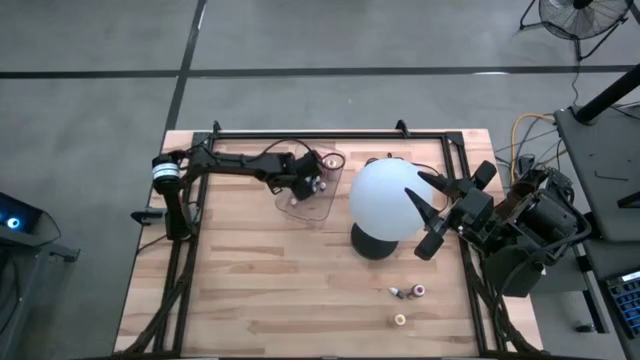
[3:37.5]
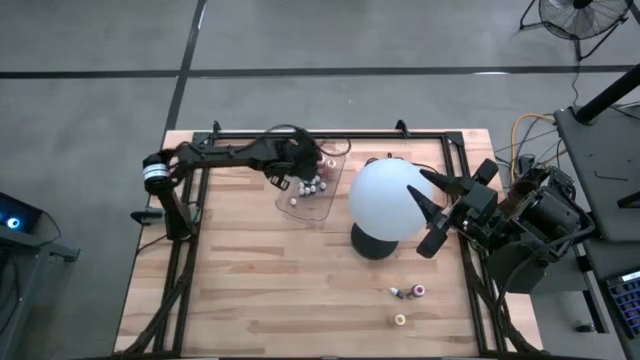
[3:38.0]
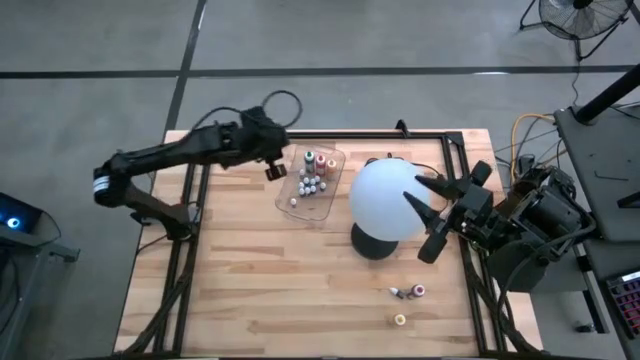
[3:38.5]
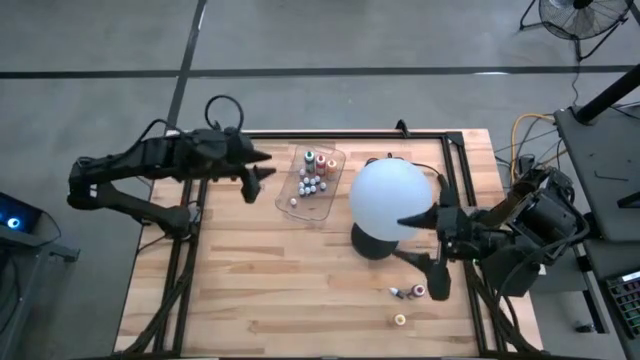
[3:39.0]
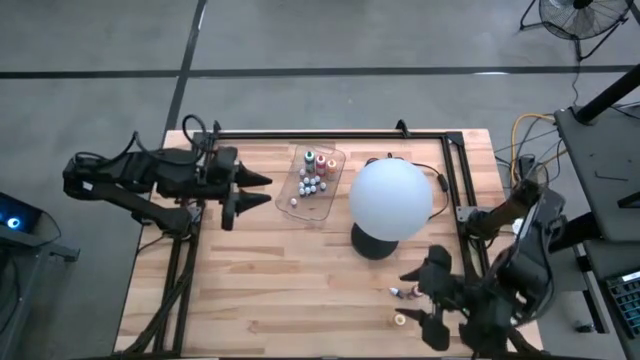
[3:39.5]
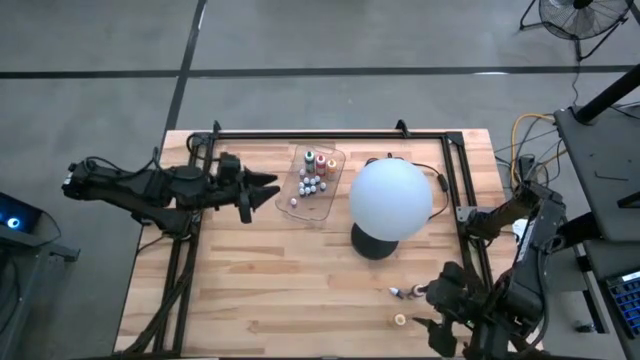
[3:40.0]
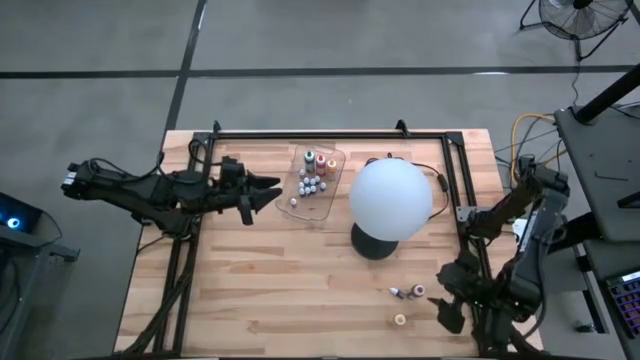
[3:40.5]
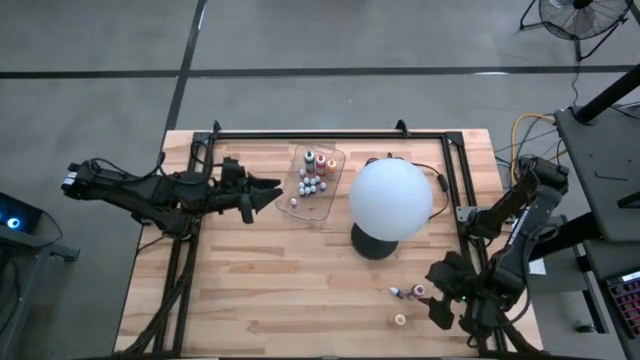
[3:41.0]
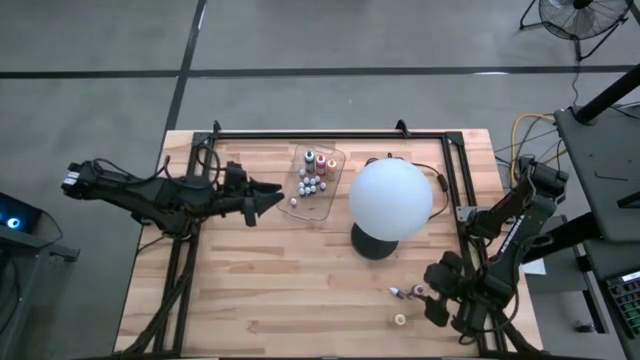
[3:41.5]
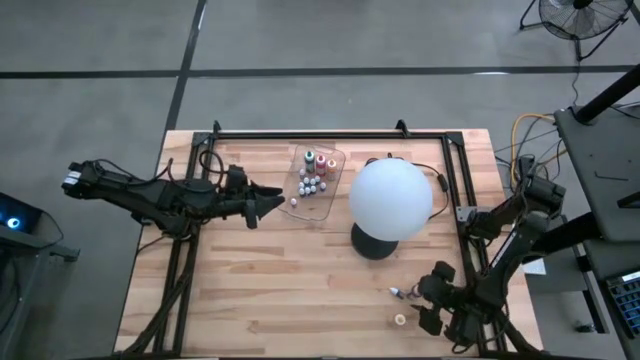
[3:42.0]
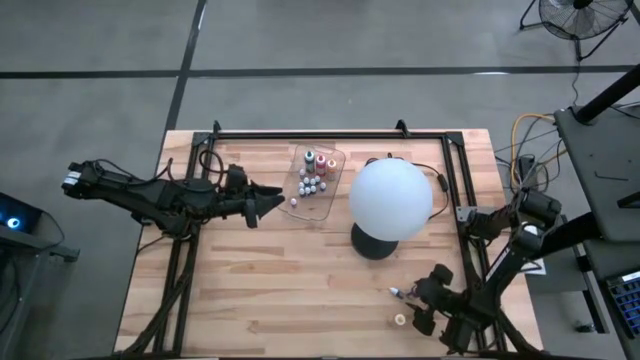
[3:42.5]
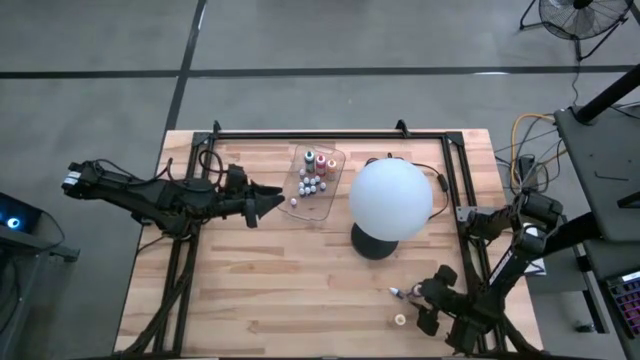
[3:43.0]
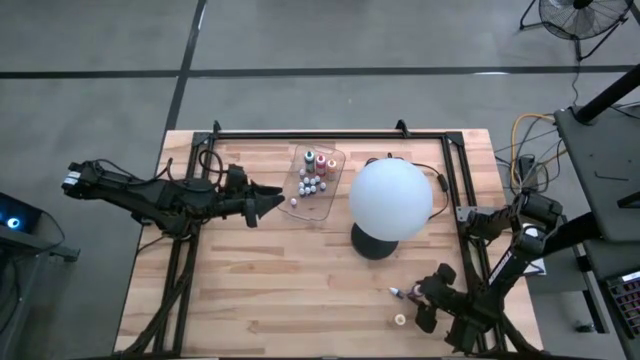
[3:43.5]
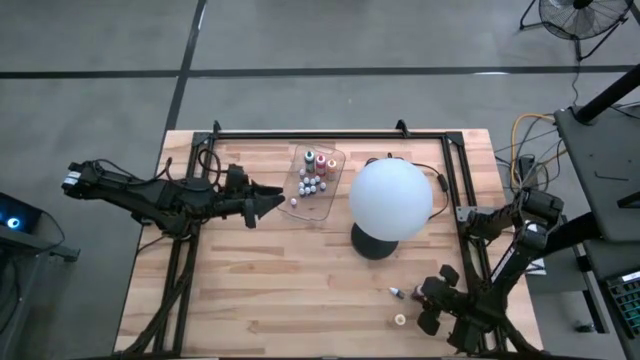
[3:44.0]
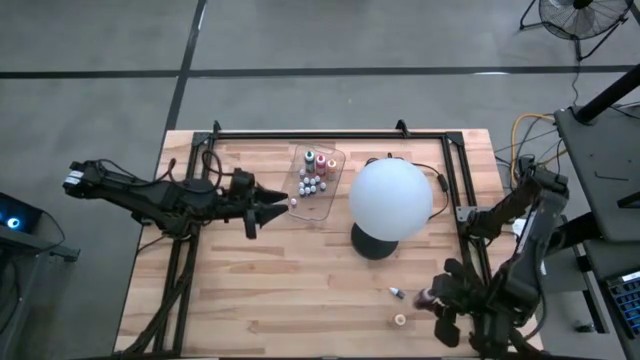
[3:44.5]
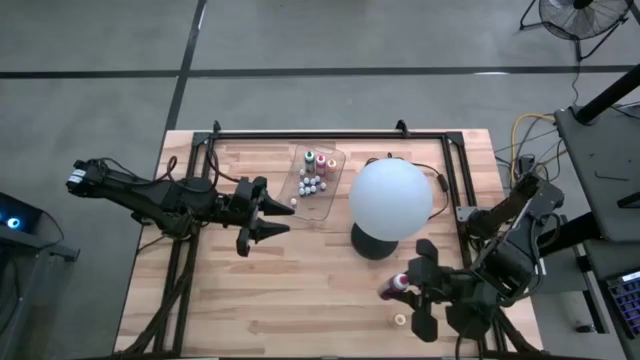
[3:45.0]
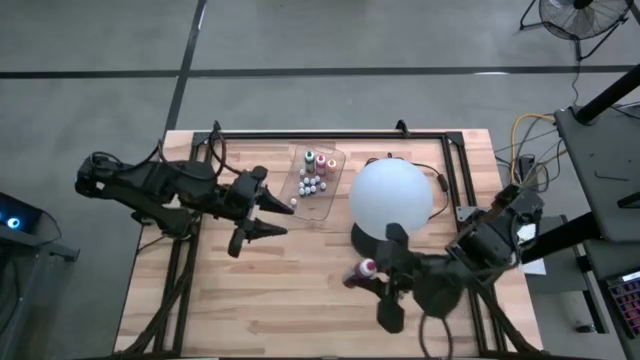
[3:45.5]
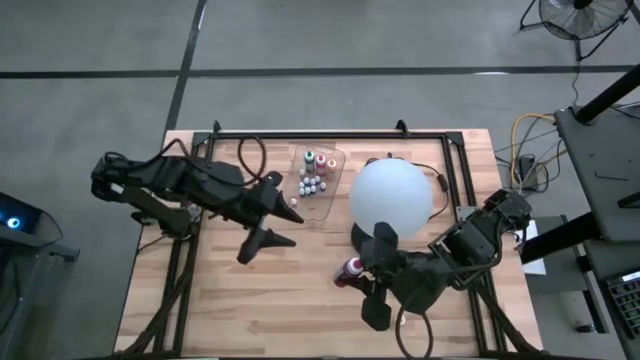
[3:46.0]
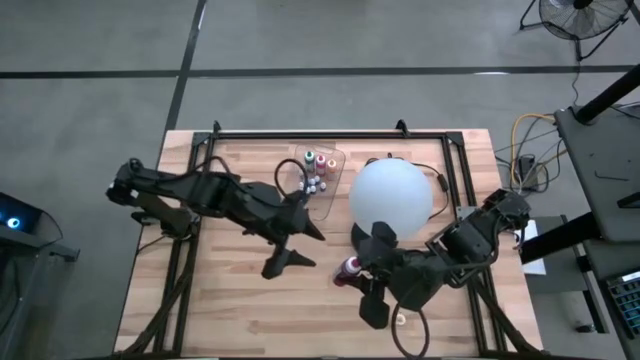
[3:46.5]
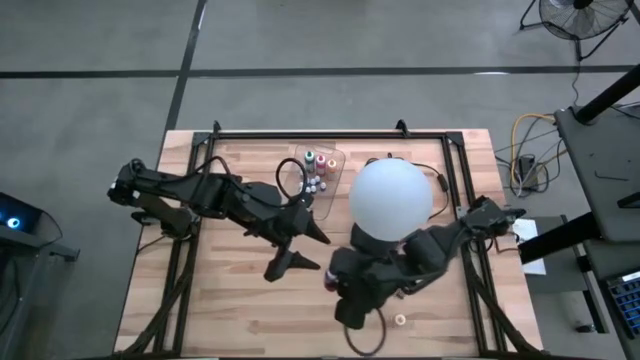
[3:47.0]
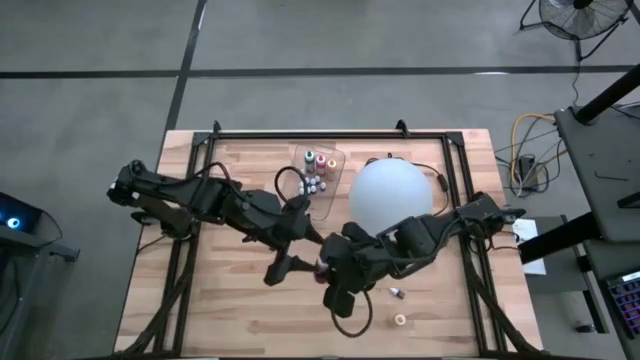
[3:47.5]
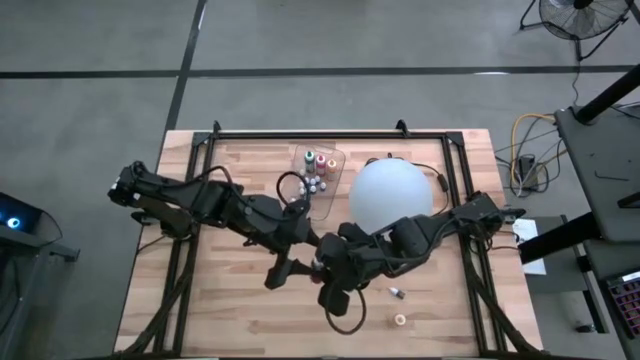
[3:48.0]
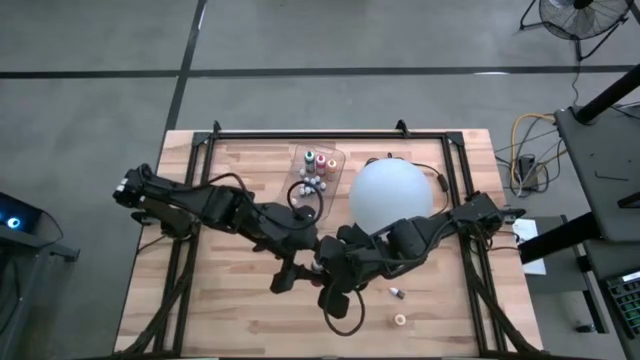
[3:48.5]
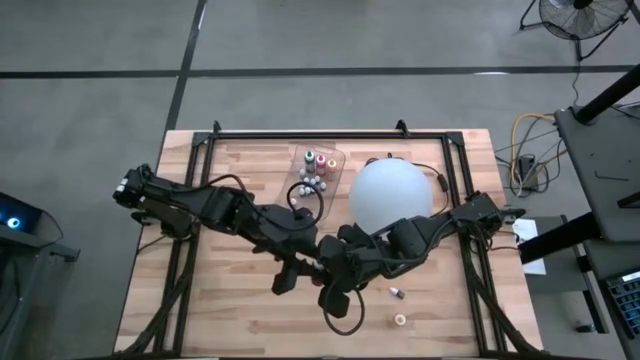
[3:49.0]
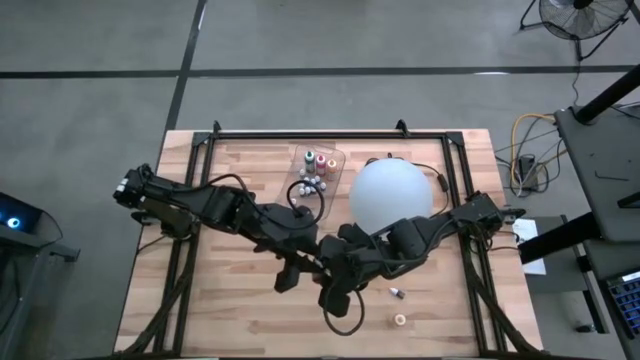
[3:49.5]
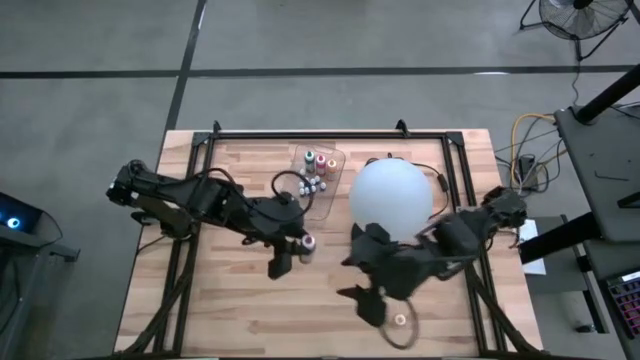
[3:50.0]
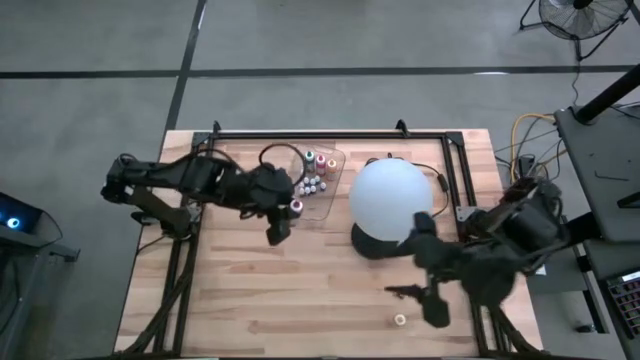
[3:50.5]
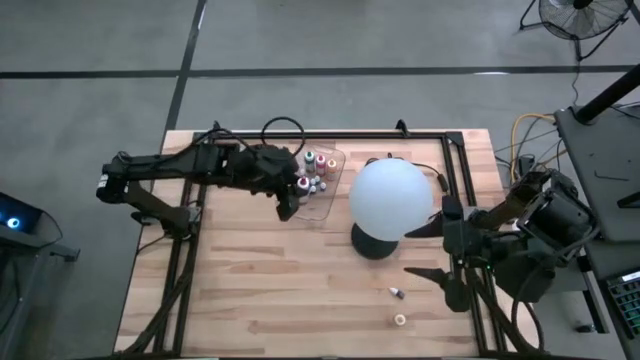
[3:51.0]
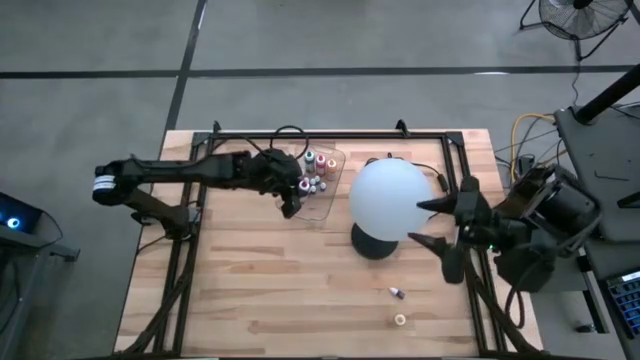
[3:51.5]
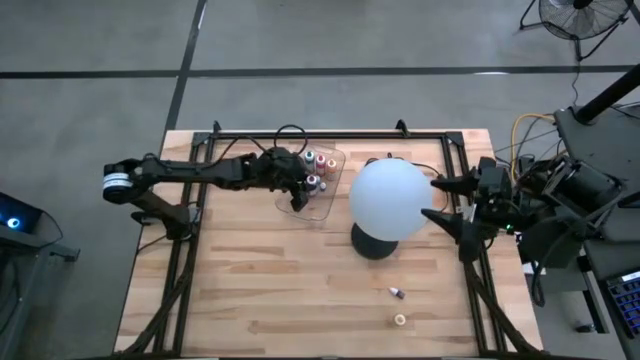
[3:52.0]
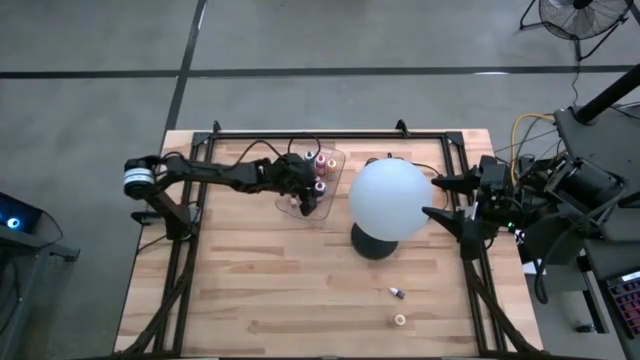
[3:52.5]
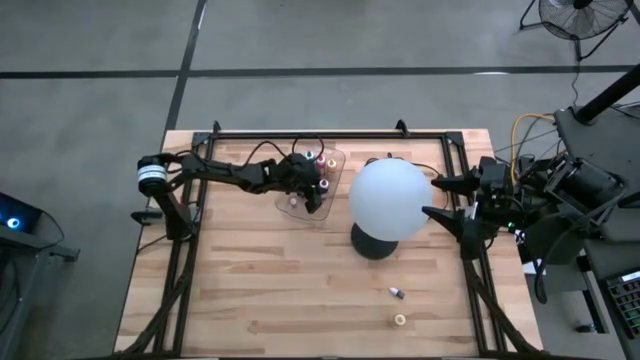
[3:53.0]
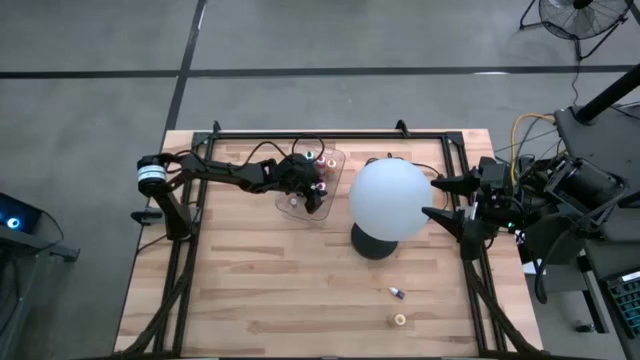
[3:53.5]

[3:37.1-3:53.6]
Task: Pick & Place food coloring
Put the large red food coloring bottle into the transparent bin

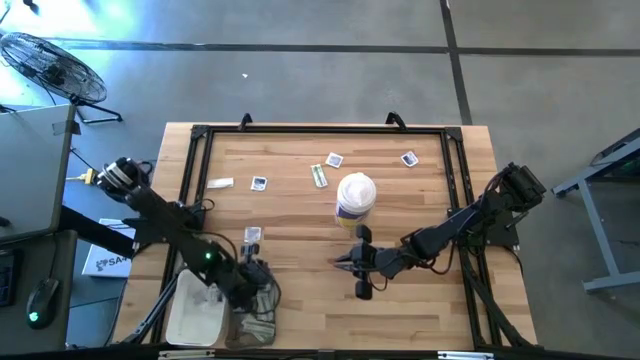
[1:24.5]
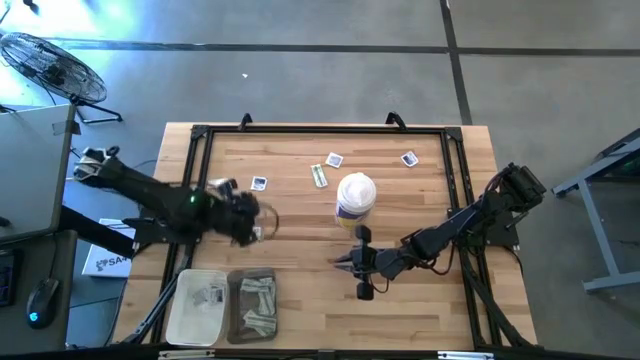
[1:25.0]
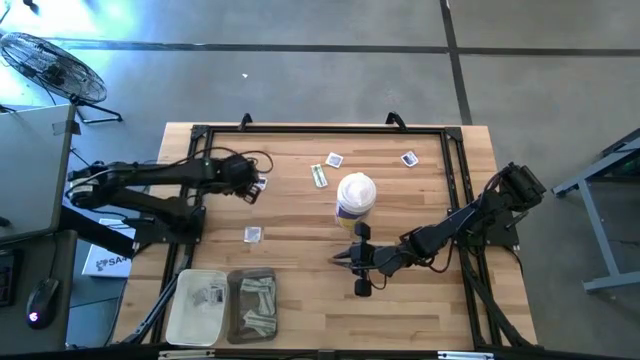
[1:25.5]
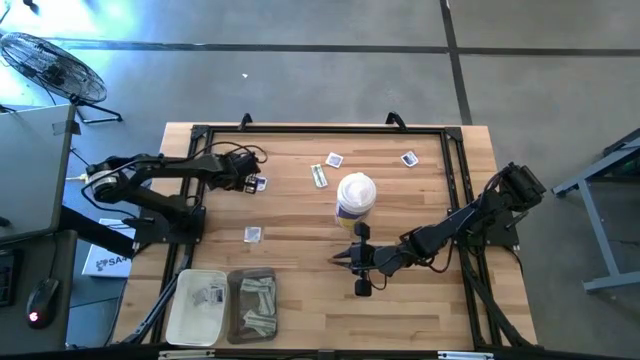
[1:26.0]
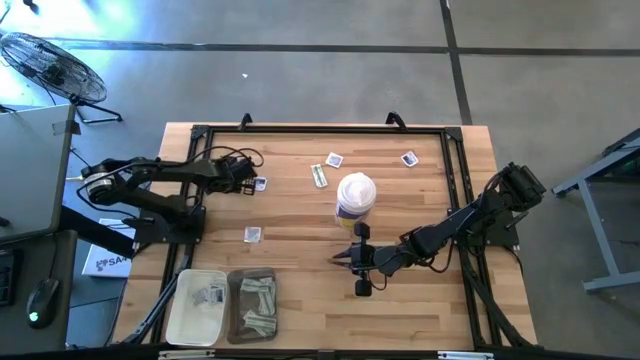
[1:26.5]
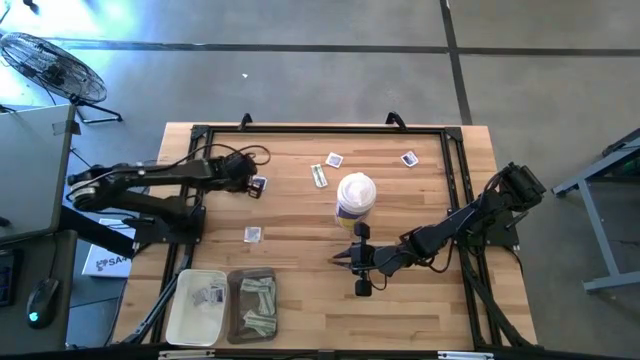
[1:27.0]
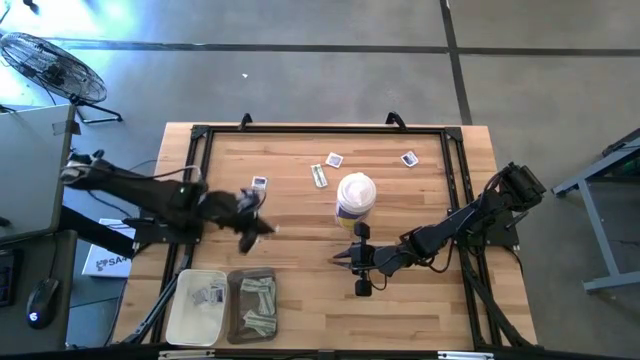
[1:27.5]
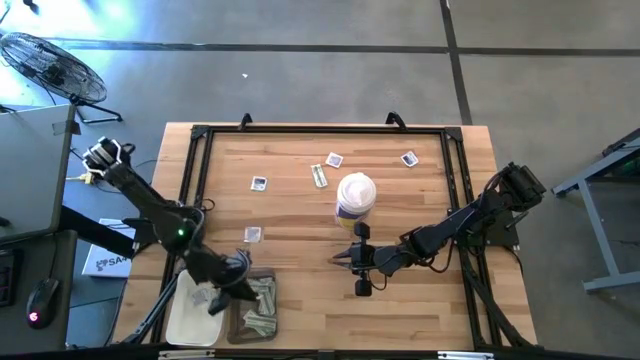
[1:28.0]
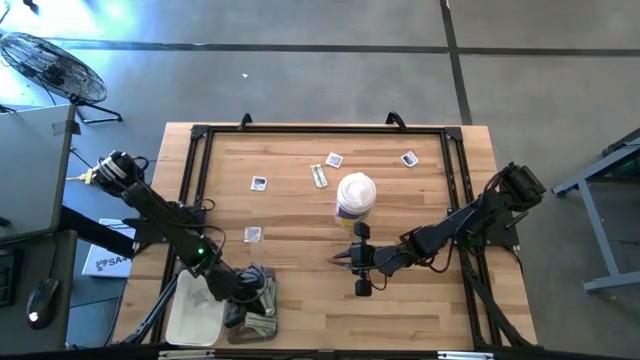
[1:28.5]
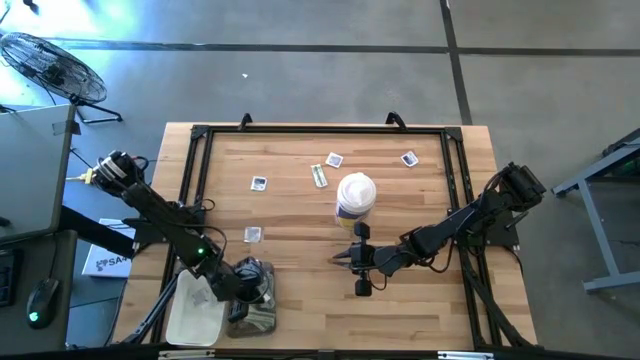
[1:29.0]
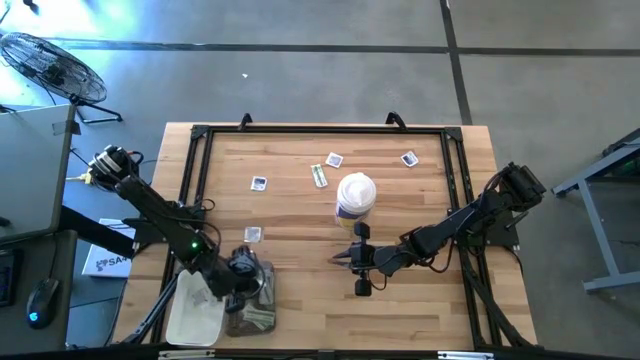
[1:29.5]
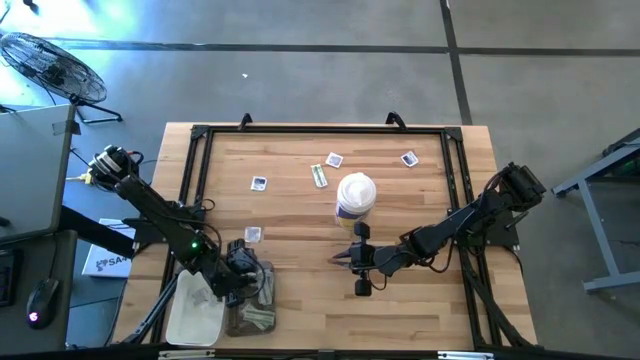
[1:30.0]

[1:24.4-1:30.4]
Task: Pick & Place First Aid Supplies
Put the bandage into the gray bin
